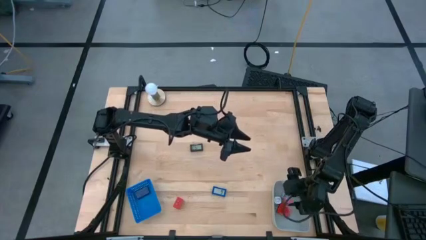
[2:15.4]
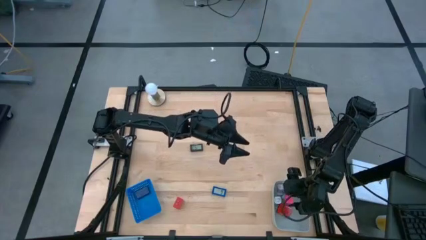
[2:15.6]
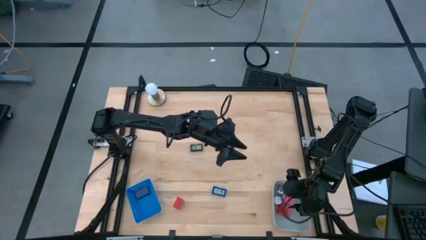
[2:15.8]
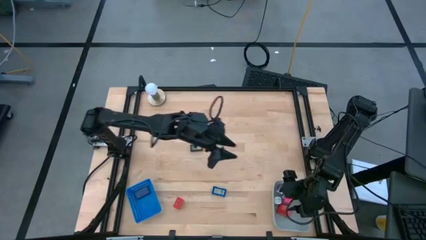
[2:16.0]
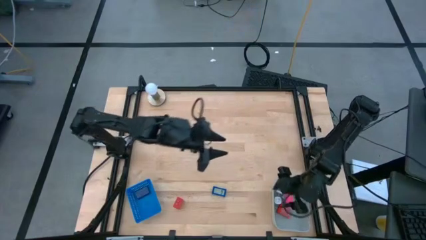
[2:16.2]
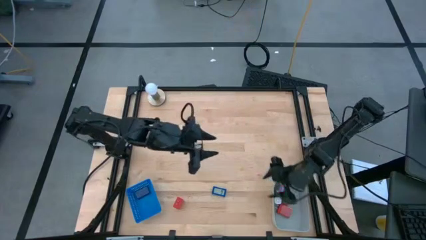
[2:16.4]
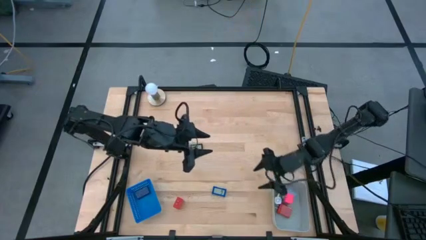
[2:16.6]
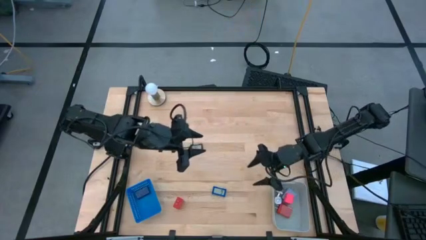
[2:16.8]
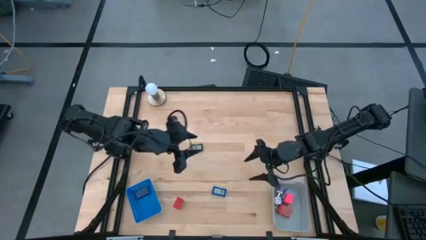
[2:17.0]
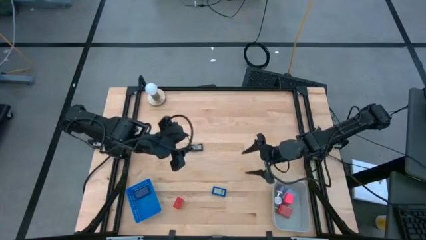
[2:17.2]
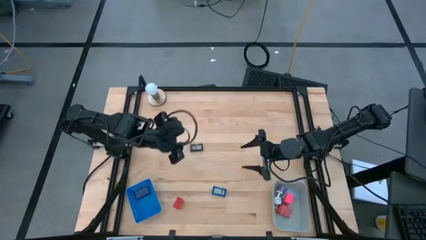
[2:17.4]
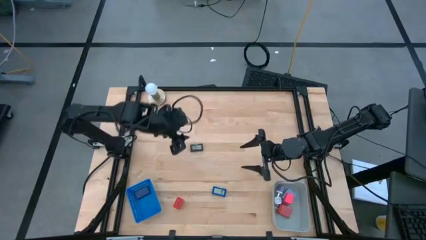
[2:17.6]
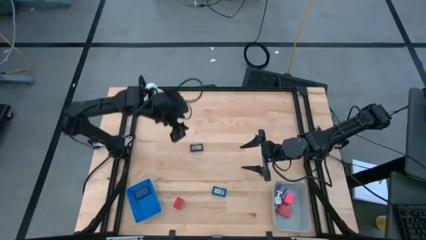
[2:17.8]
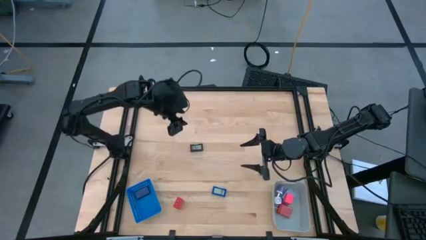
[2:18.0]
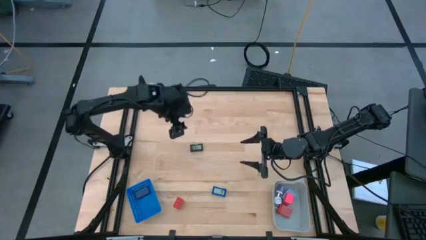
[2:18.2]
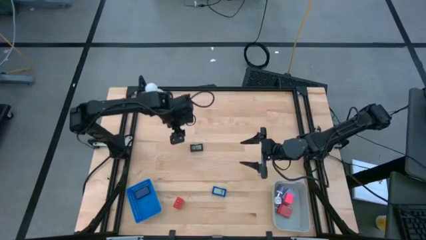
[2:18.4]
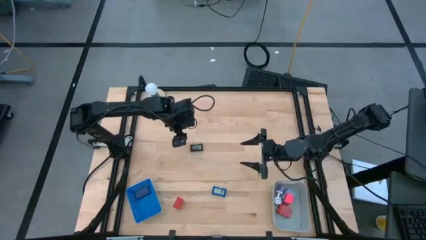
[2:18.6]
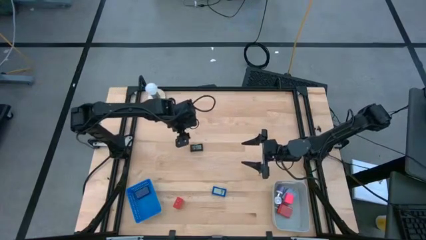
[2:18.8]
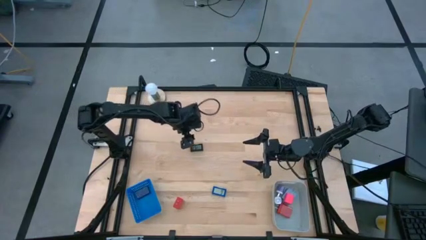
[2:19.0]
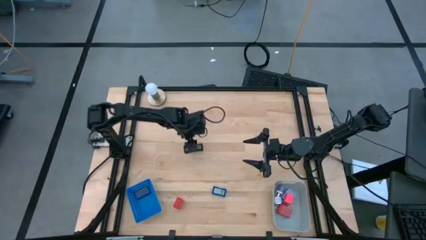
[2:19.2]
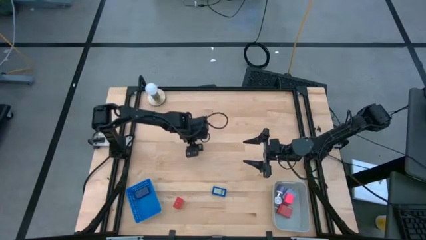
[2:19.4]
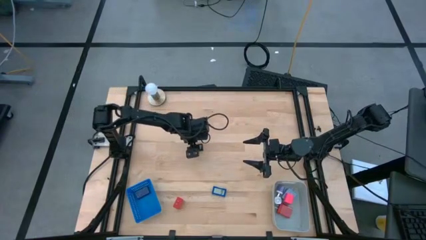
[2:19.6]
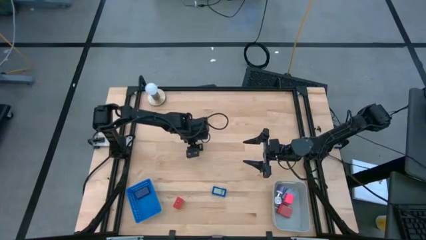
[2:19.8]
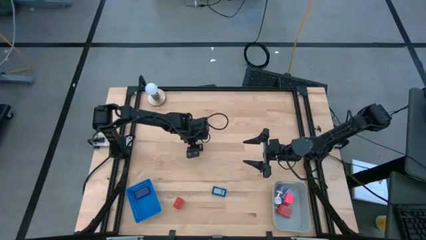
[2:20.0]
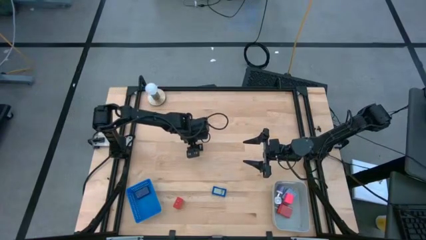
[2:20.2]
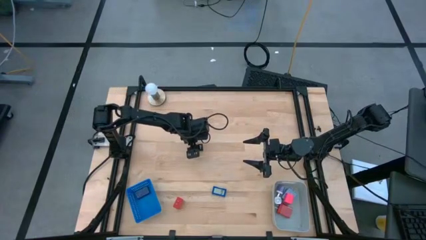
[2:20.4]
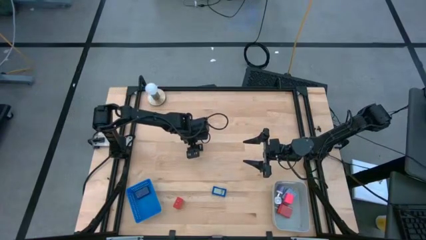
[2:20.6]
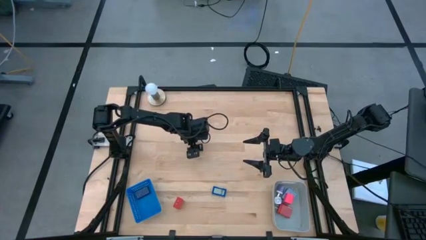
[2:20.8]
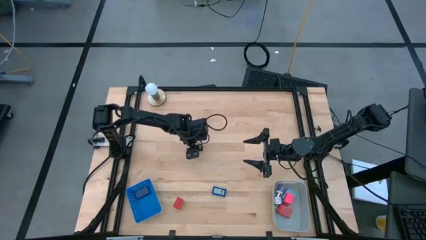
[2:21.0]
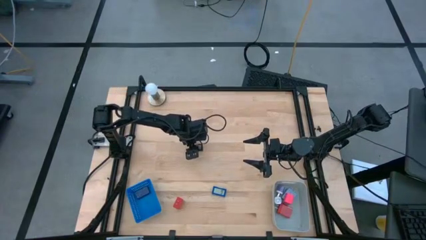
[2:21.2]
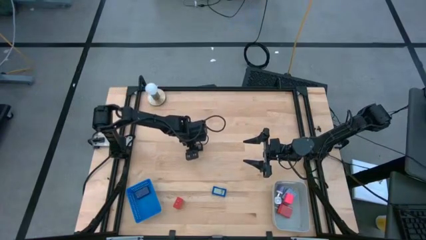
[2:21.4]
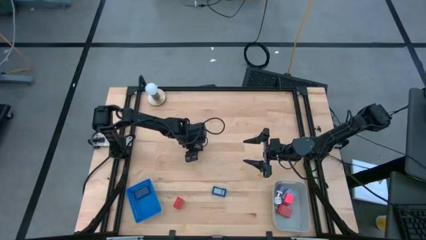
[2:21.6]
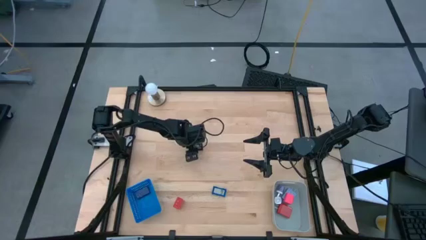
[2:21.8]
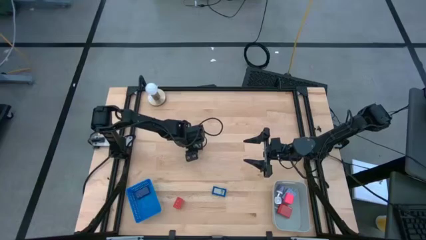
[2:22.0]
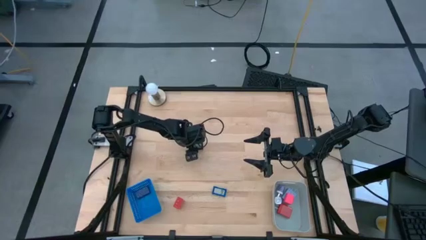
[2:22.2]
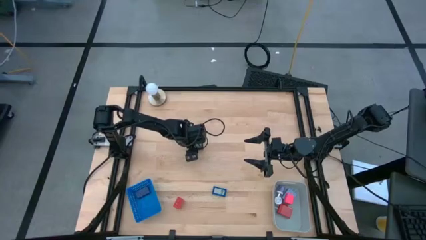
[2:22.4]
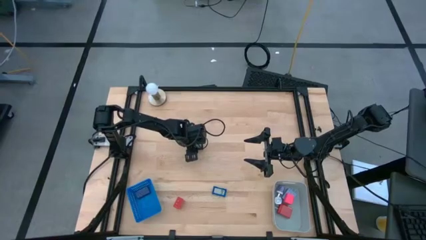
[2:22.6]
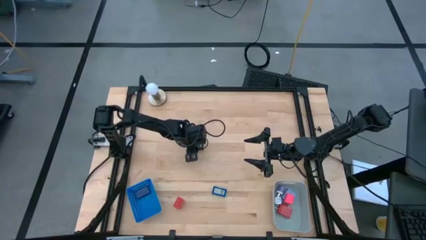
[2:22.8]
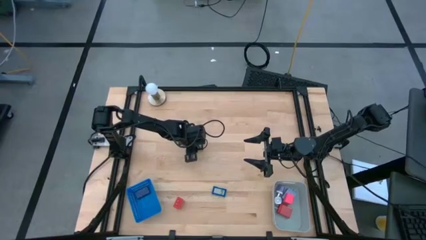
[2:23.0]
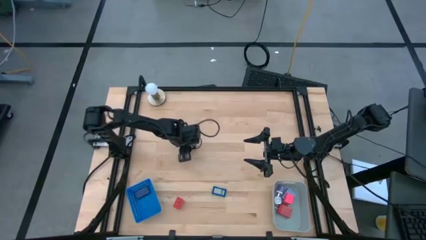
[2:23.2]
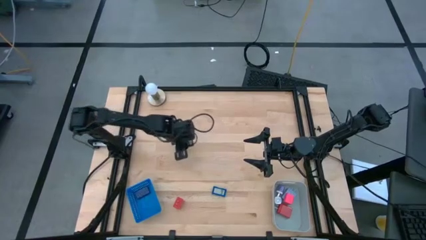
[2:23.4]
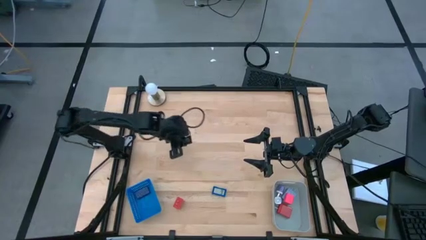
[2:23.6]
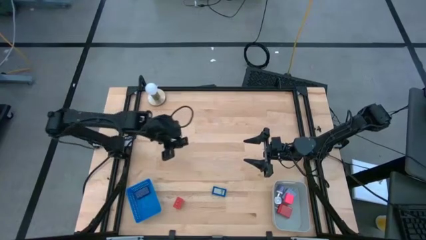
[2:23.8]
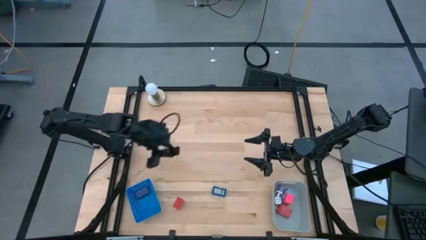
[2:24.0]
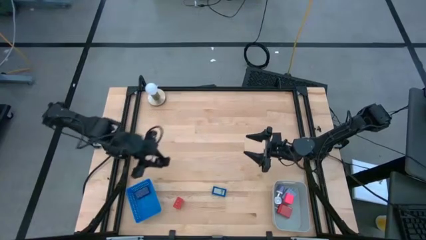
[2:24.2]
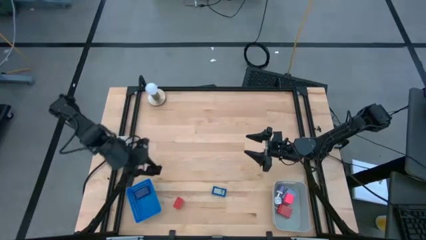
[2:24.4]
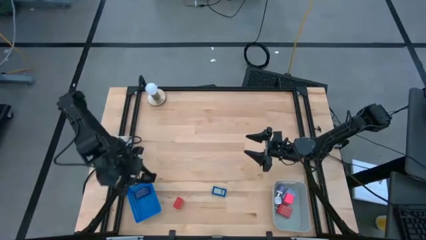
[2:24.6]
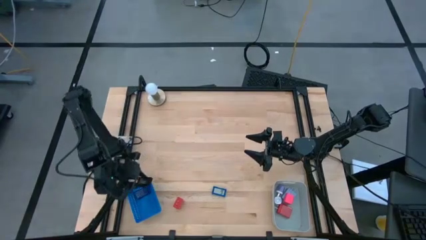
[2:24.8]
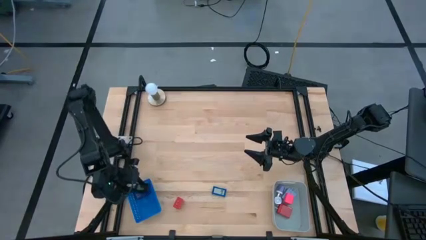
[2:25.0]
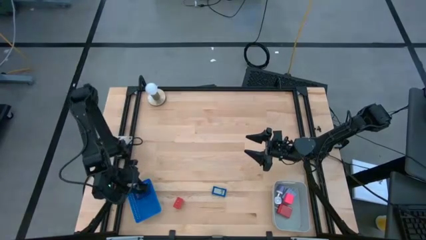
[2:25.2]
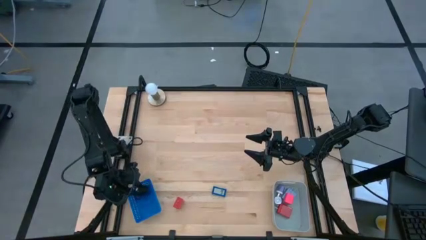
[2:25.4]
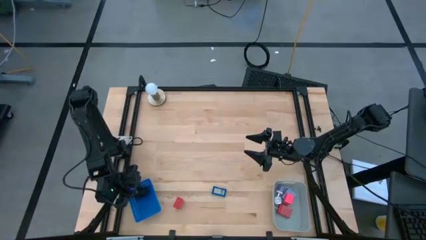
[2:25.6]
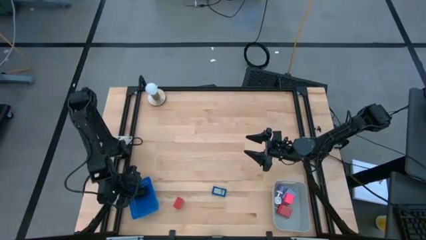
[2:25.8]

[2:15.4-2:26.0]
Task: Pick & Place Office items
Put the black digital timer into the blue bin

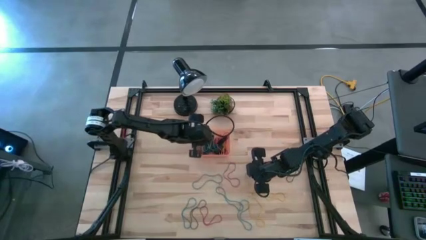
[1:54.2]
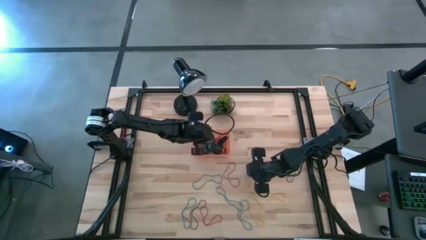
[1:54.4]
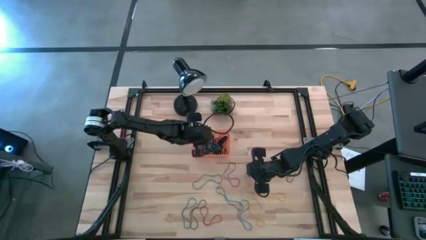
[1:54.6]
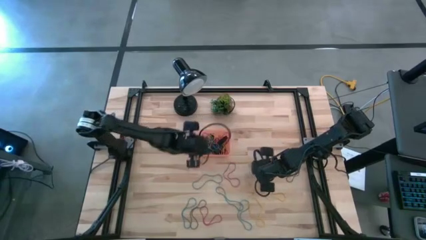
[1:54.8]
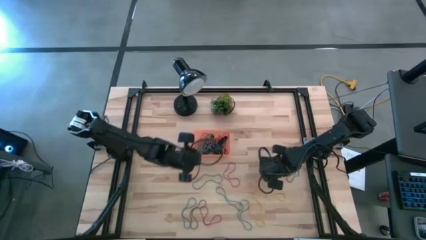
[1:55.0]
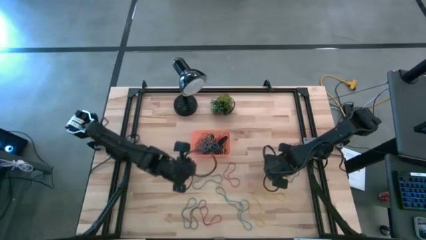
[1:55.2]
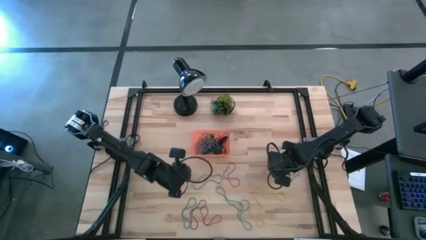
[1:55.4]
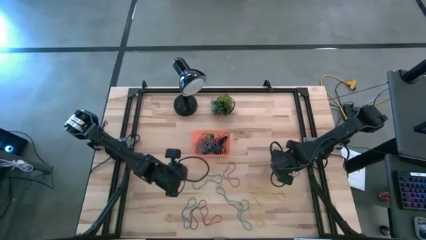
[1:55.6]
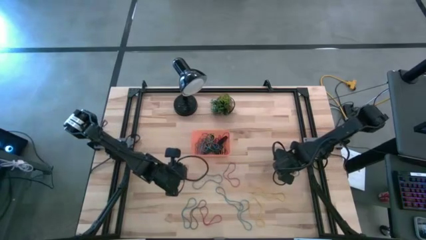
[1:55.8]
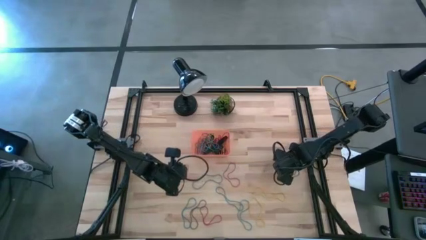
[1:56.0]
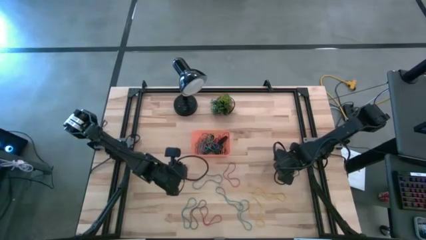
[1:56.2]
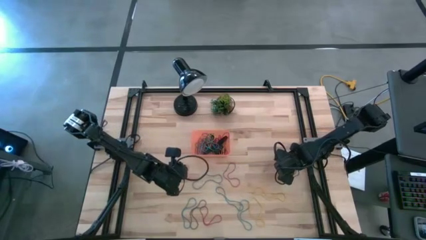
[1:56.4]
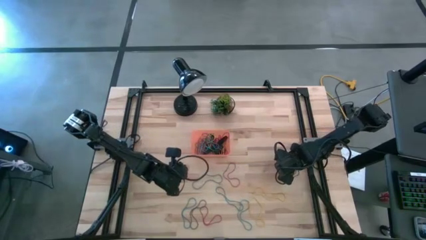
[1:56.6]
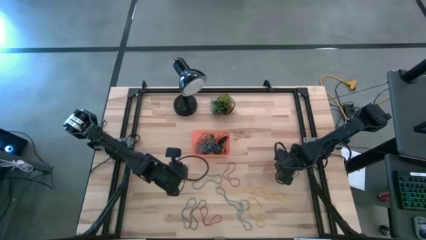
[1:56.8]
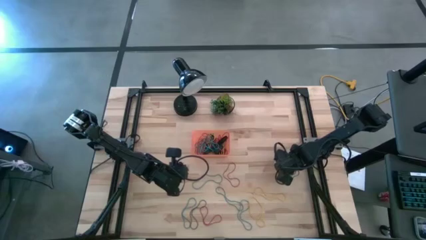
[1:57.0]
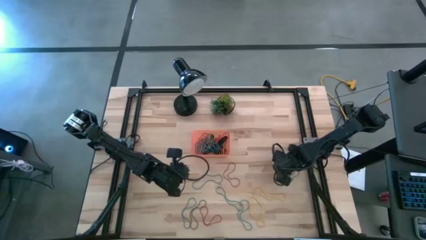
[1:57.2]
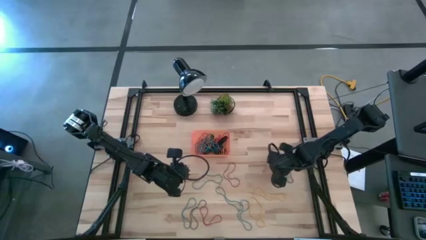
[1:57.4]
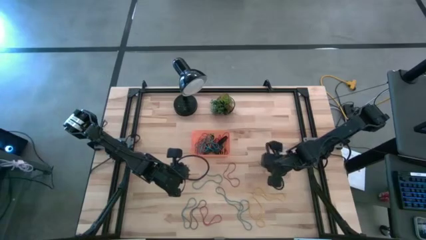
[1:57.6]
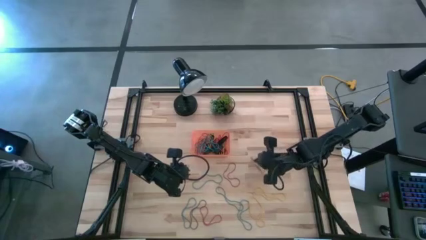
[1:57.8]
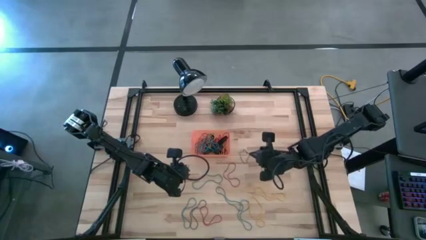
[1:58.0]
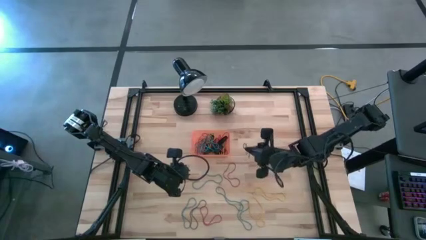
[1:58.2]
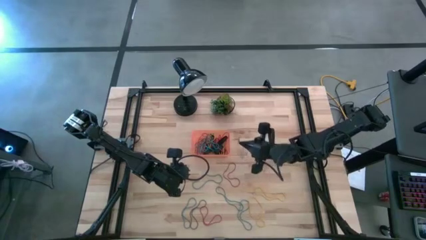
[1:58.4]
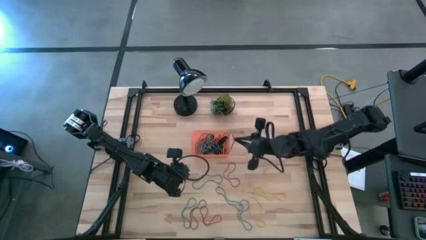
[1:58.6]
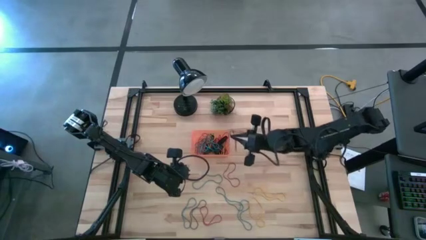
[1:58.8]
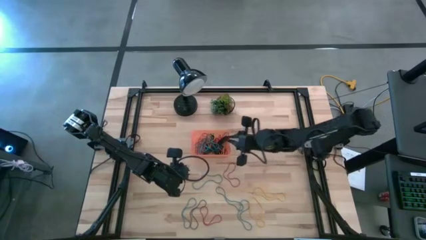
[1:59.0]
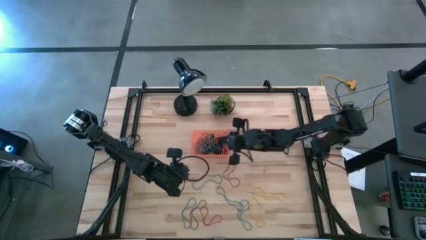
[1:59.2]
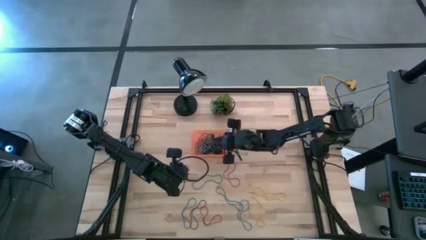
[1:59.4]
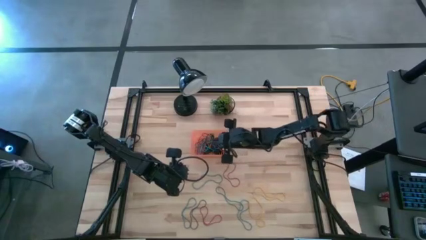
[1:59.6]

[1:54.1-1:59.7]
Task: Pick and place rubber bands into bin
Put the violet rubberband into the orange bin
